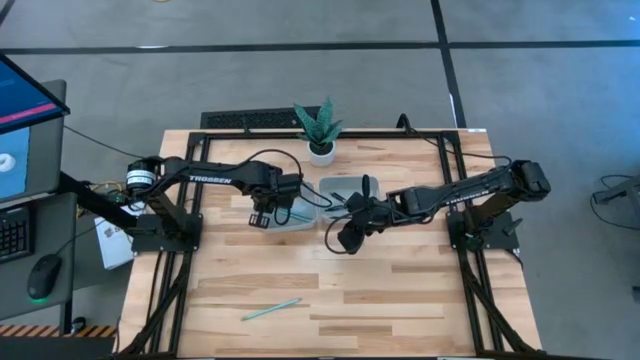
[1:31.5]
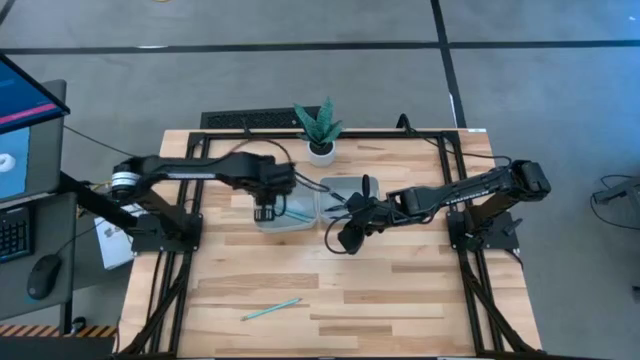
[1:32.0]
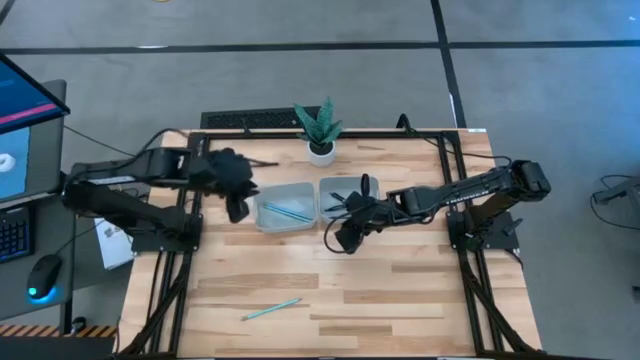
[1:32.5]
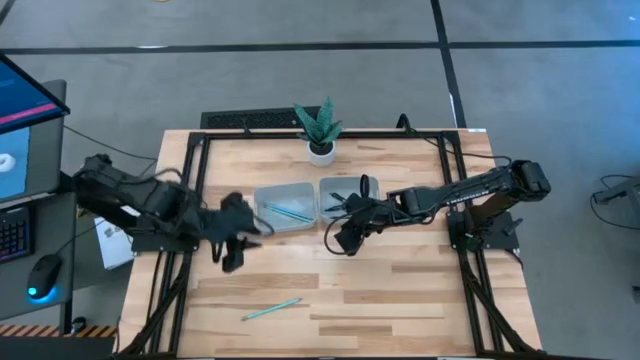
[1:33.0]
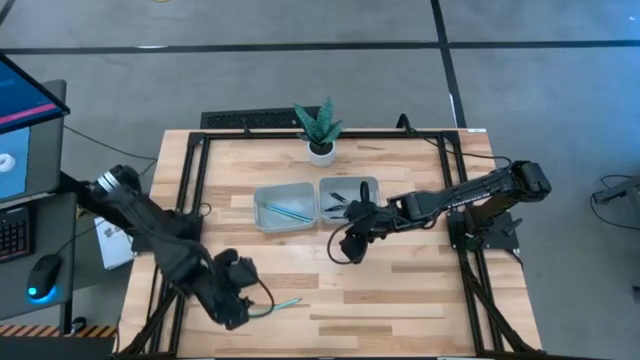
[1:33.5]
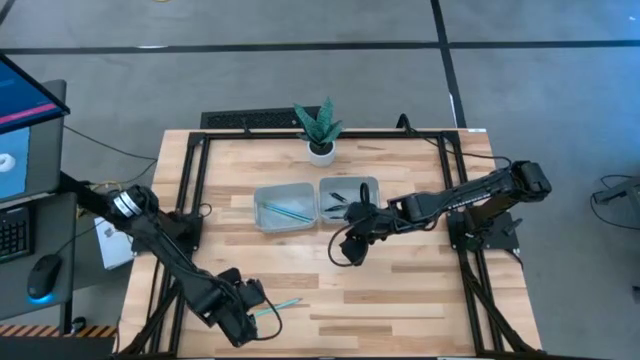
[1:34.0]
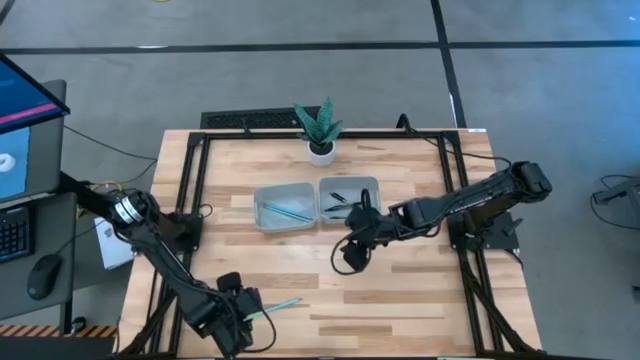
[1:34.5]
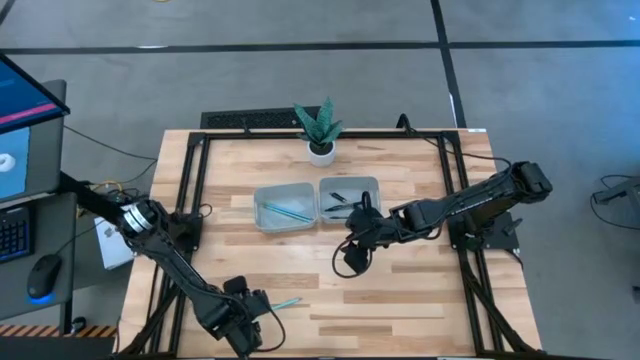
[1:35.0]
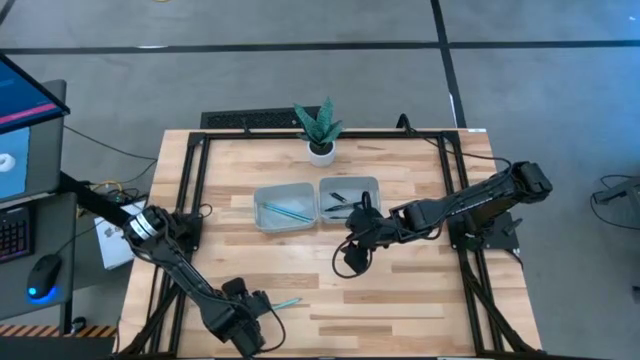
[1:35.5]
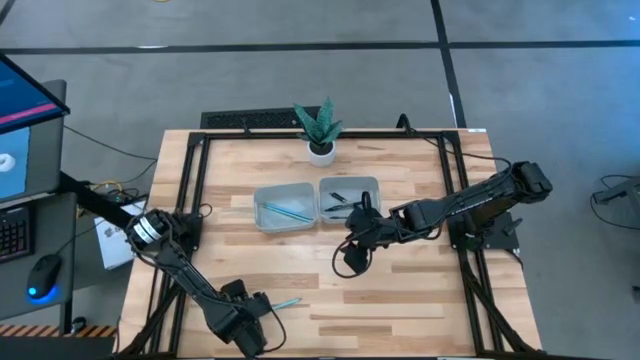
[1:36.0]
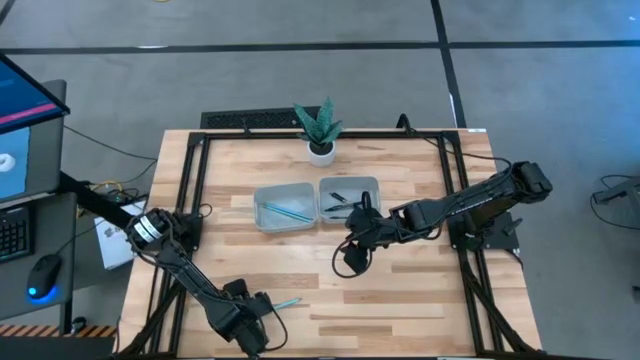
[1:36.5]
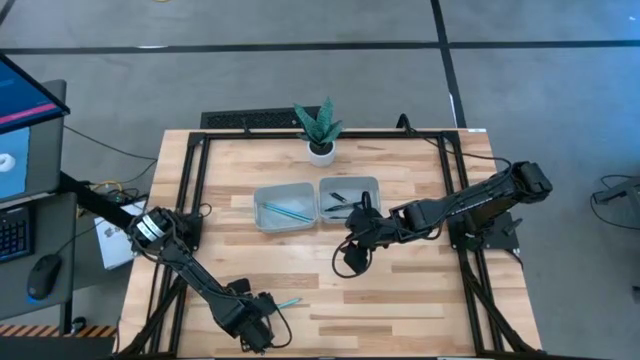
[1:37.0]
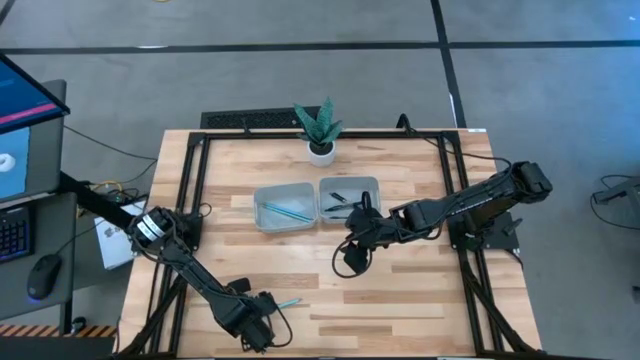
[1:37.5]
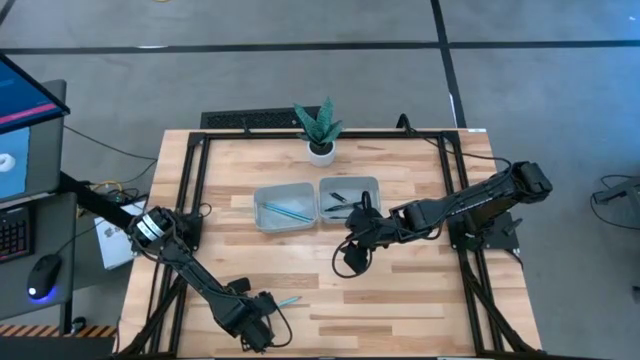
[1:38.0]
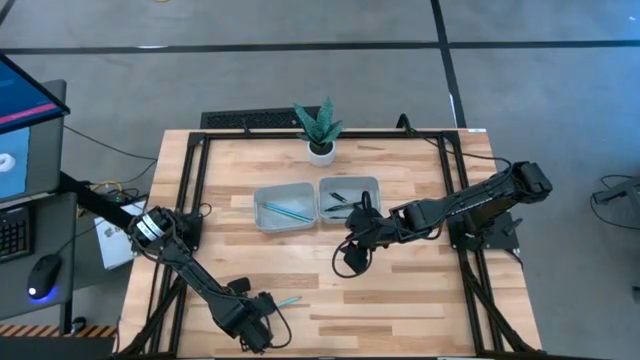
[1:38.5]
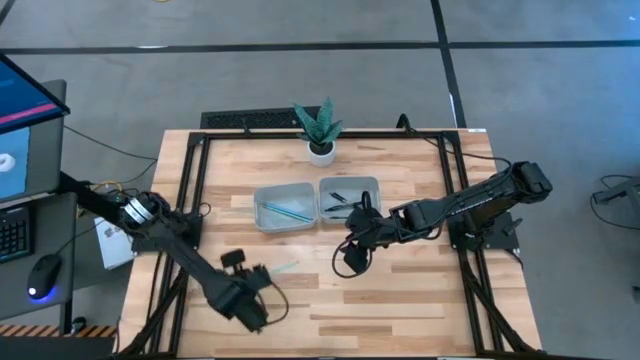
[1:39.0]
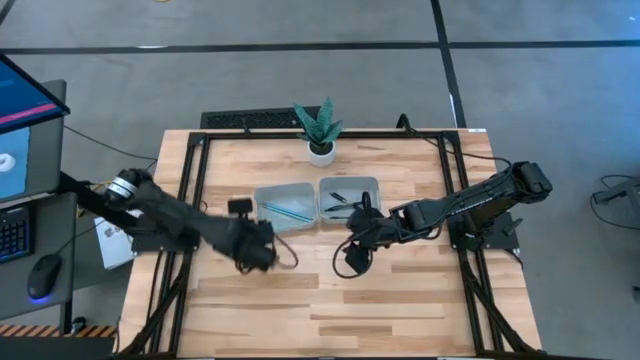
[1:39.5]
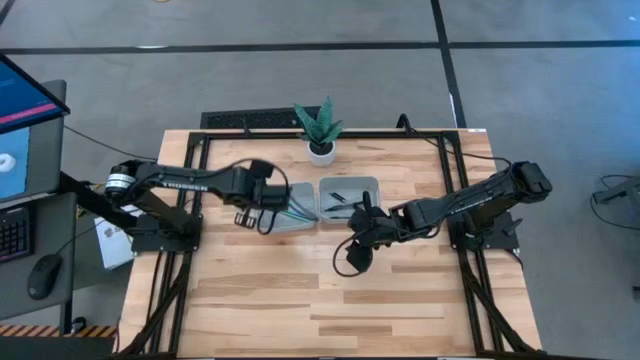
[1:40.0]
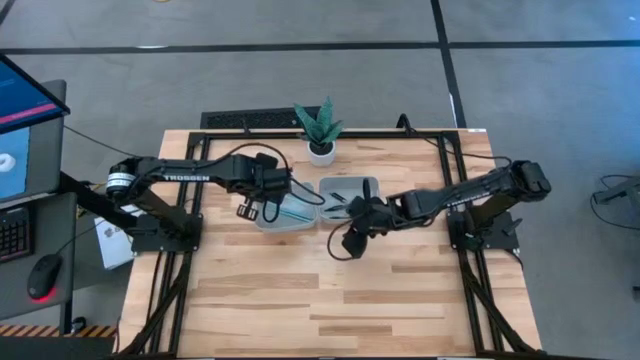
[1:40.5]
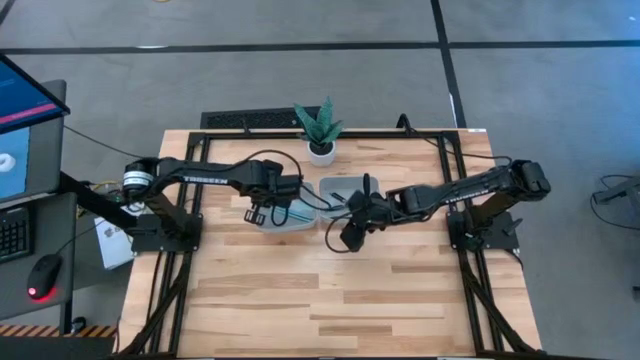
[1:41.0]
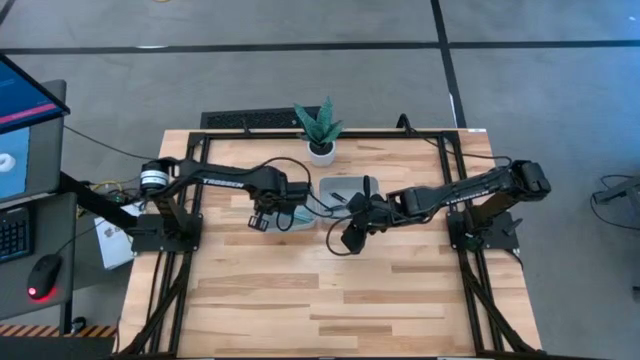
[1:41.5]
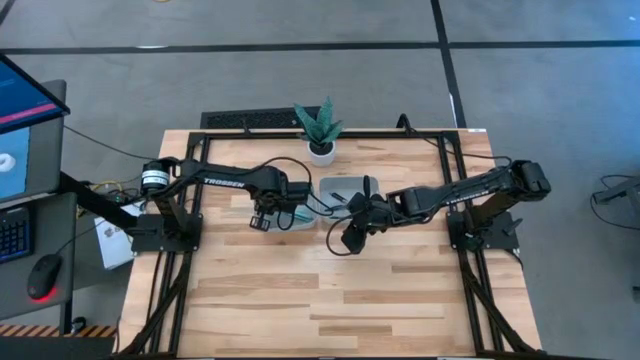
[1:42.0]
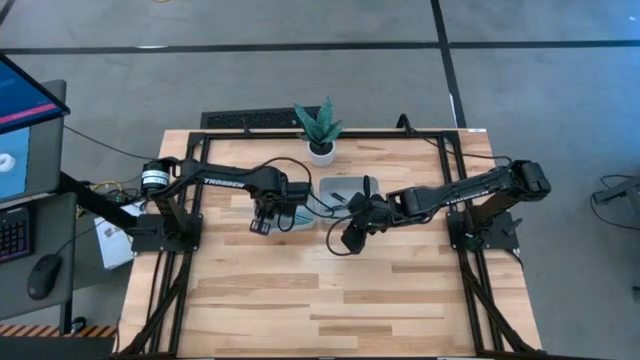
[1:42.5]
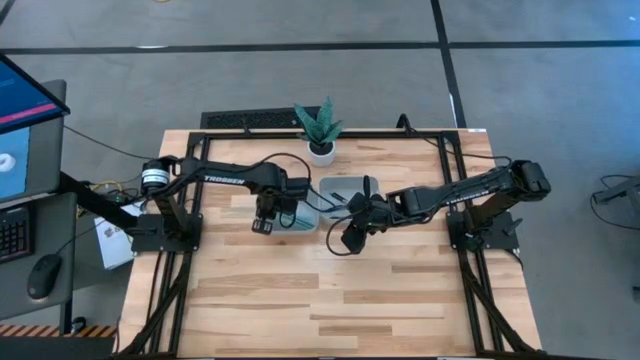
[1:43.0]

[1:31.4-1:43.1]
Task: Sort pens & pencils
Put the green pencil into the left gray bin

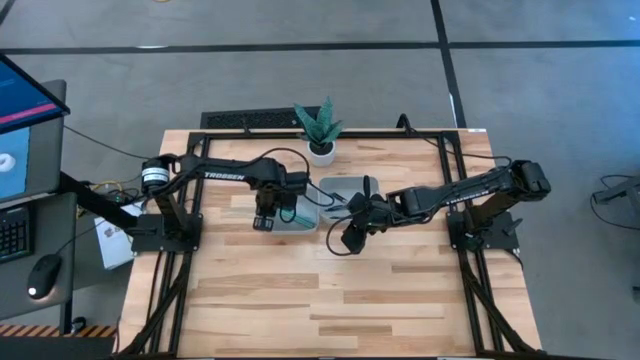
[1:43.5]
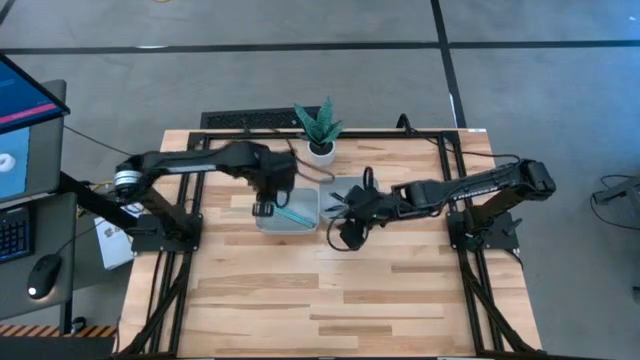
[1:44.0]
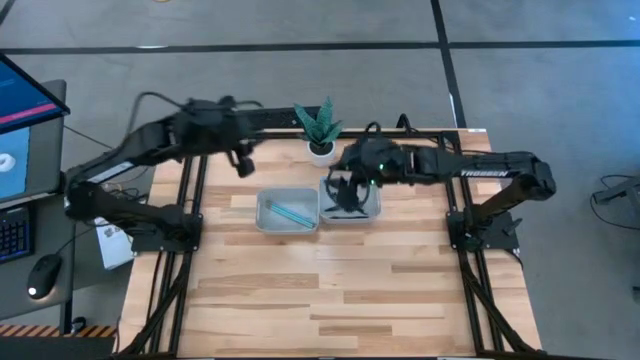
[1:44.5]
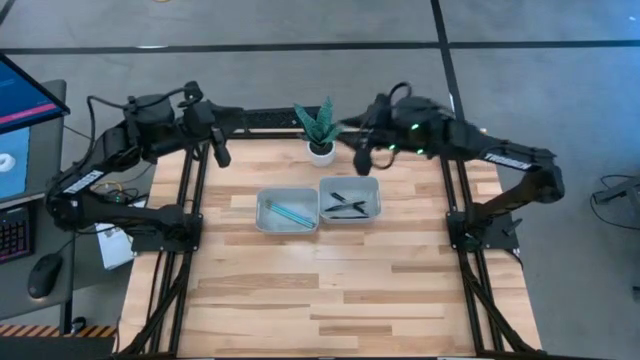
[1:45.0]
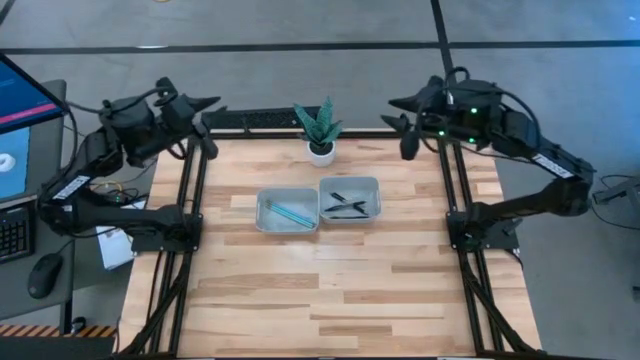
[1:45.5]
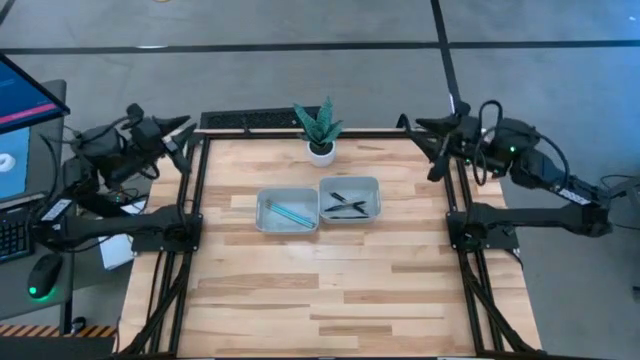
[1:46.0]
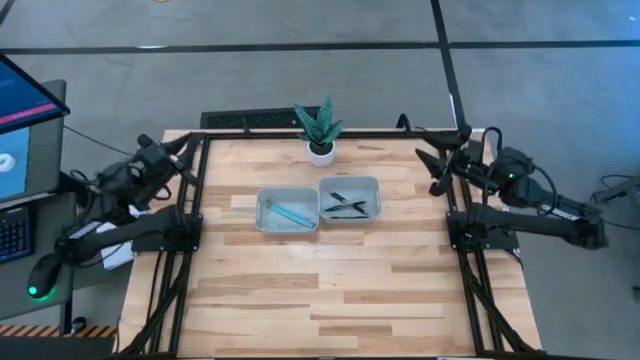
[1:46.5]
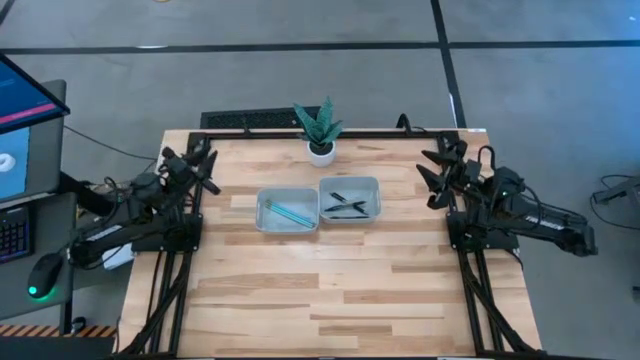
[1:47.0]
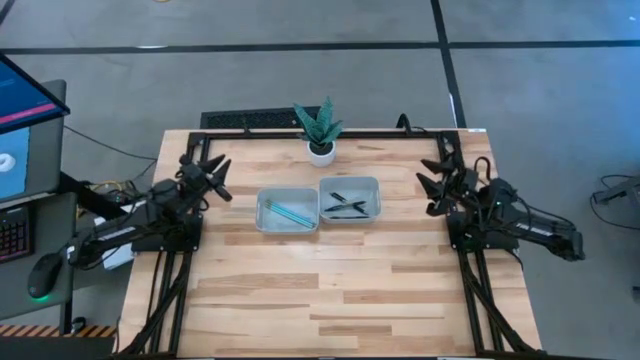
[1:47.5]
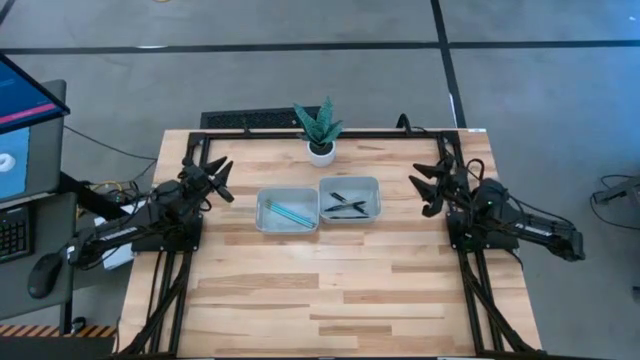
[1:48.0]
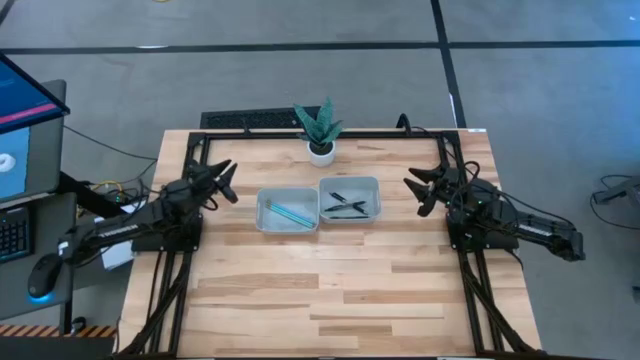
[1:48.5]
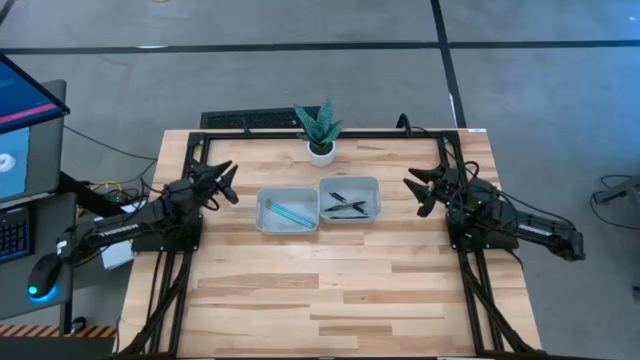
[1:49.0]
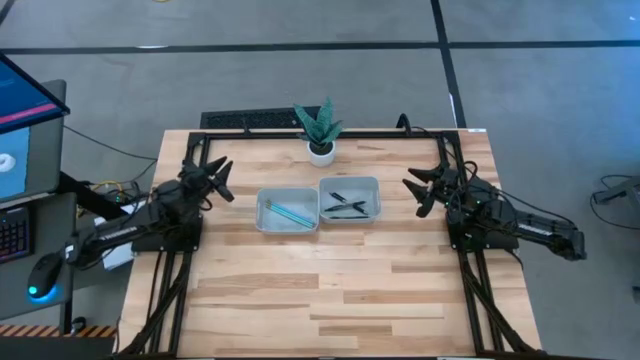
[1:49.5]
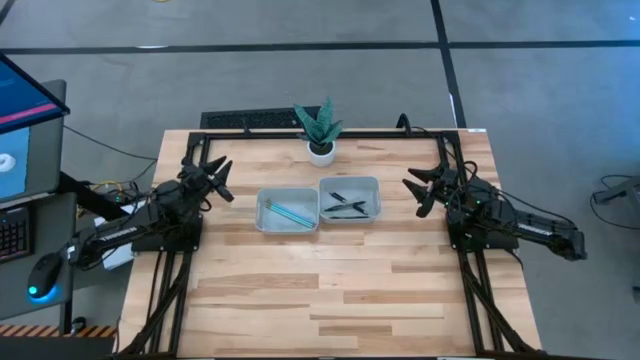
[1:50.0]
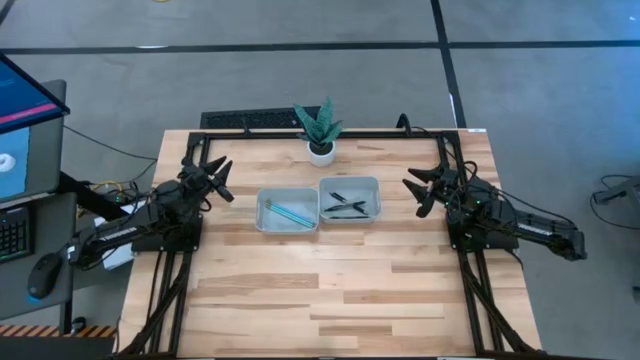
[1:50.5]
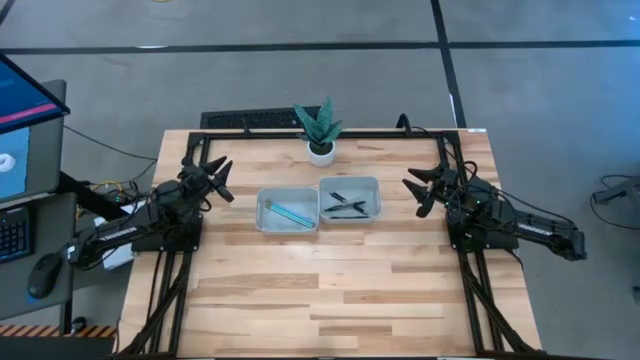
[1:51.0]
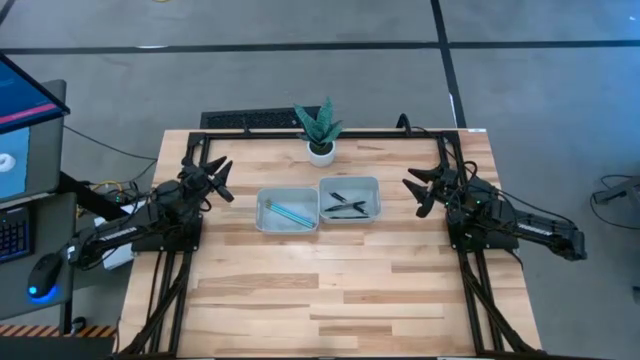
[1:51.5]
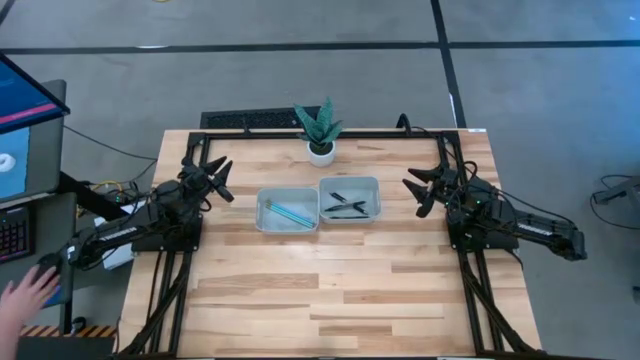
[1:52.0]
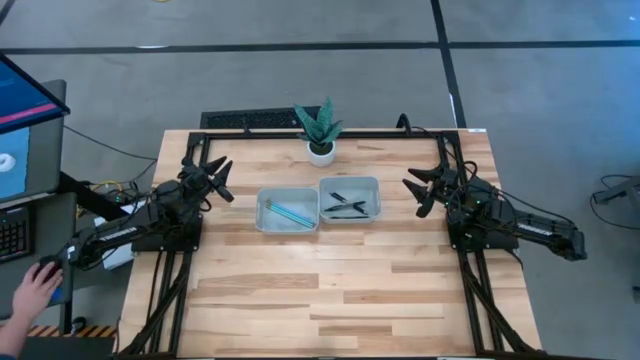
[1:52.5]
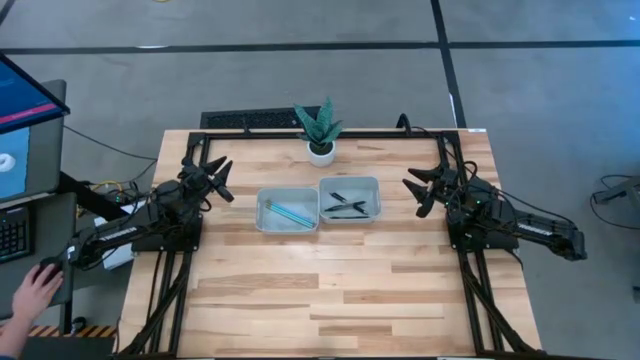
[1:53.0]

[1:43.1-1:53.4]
Return to Home Position
